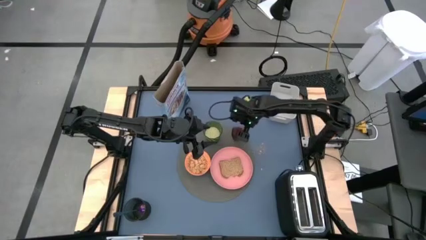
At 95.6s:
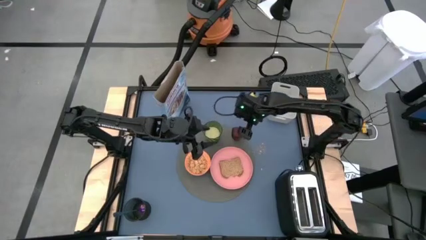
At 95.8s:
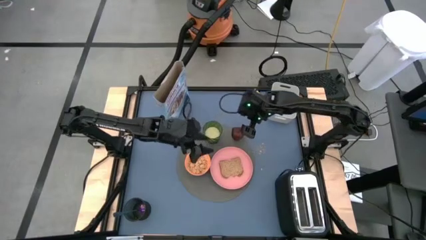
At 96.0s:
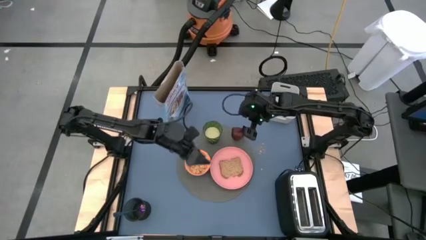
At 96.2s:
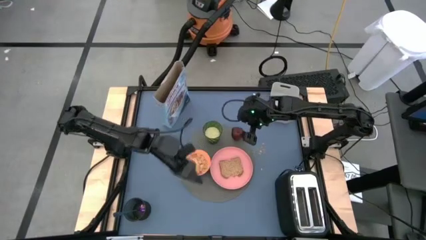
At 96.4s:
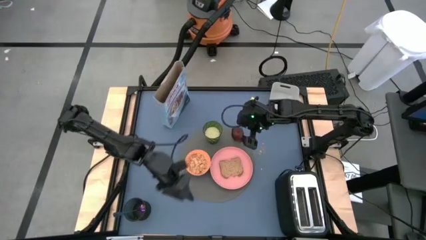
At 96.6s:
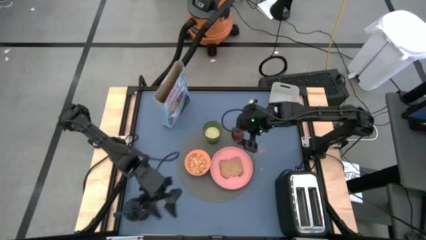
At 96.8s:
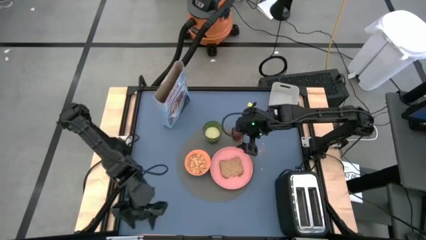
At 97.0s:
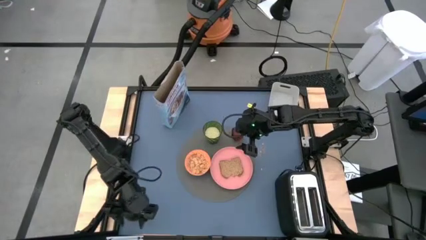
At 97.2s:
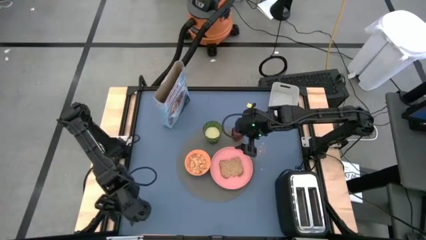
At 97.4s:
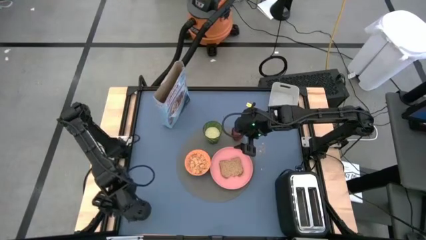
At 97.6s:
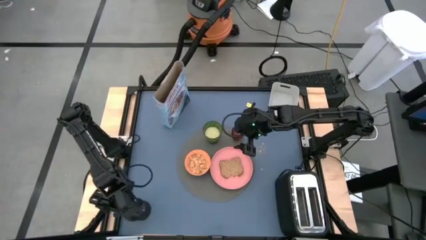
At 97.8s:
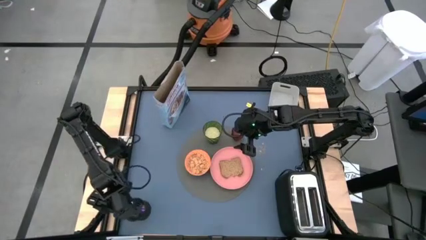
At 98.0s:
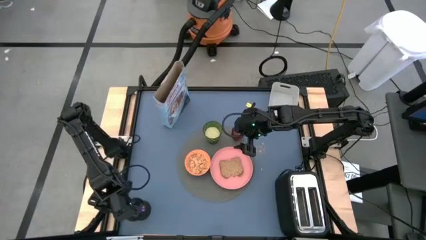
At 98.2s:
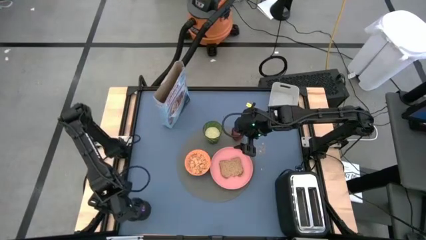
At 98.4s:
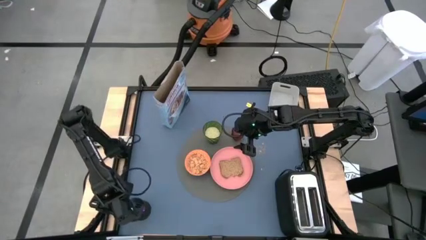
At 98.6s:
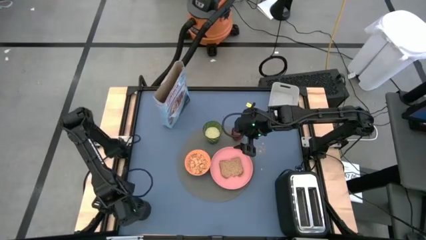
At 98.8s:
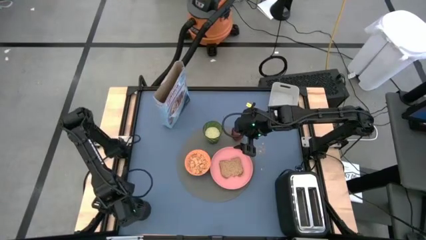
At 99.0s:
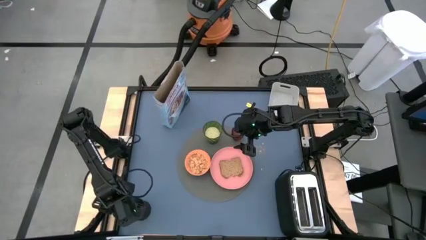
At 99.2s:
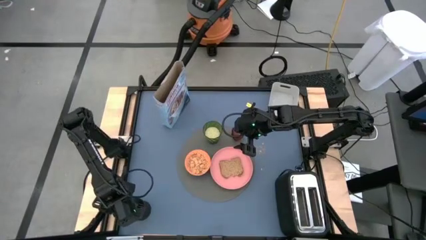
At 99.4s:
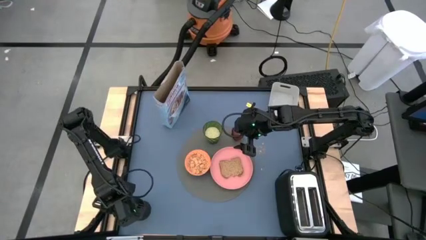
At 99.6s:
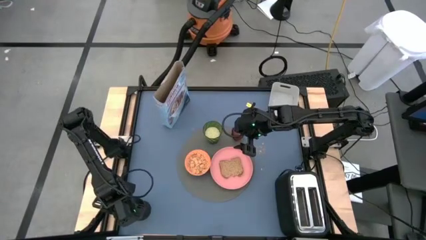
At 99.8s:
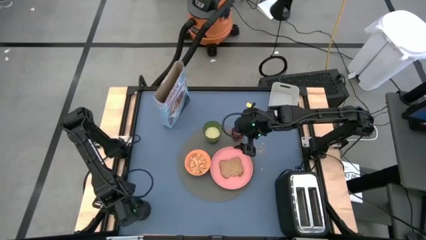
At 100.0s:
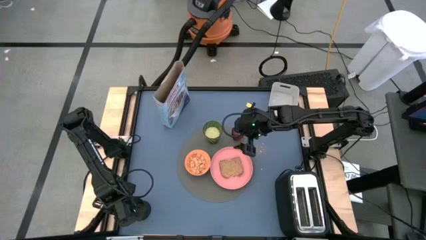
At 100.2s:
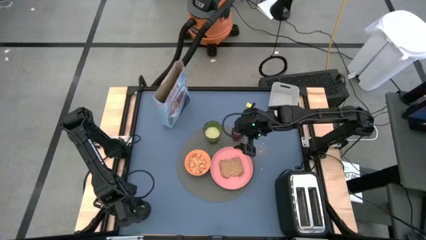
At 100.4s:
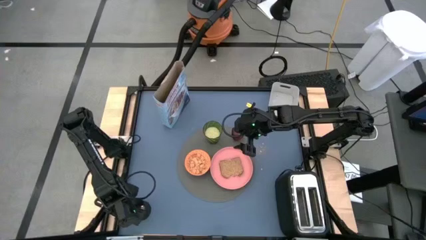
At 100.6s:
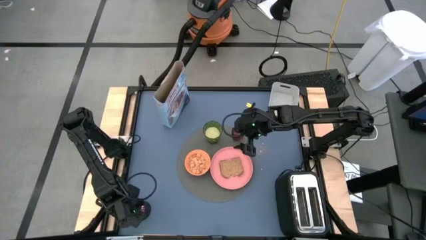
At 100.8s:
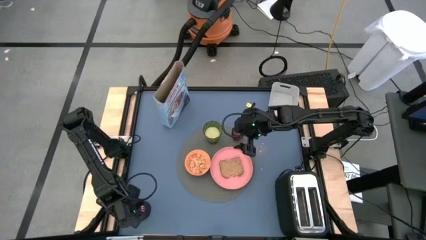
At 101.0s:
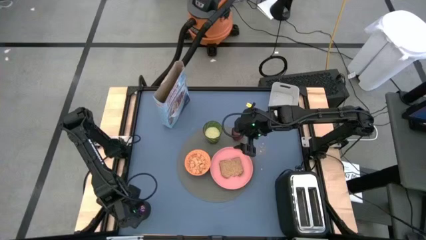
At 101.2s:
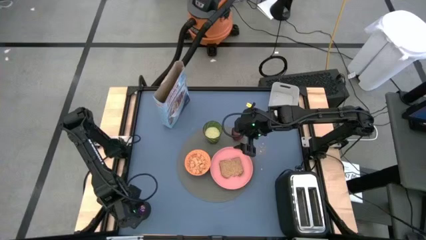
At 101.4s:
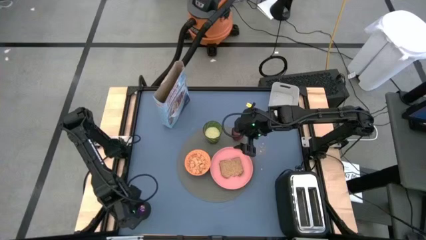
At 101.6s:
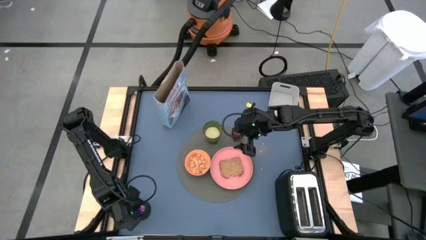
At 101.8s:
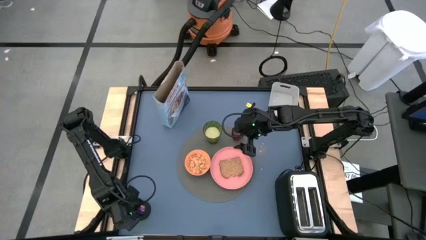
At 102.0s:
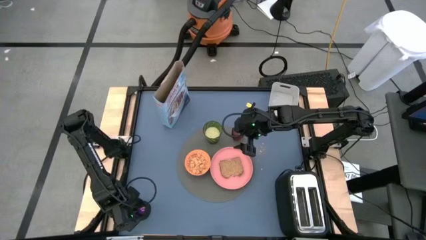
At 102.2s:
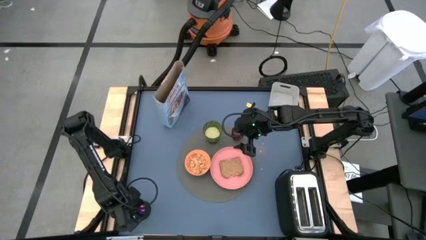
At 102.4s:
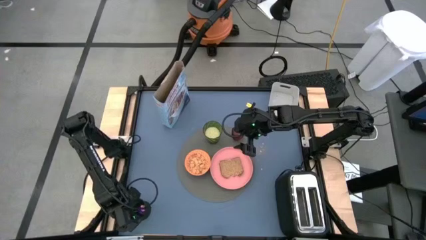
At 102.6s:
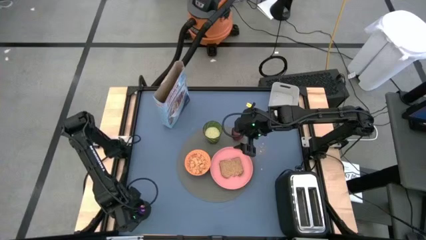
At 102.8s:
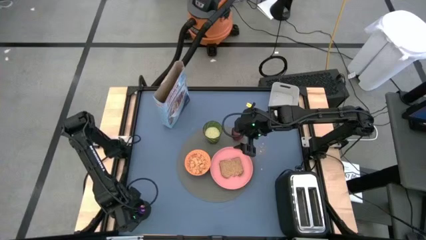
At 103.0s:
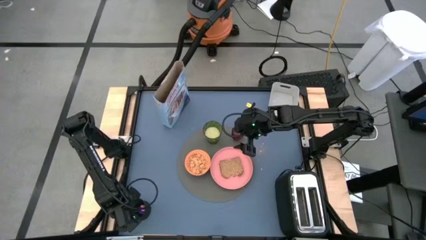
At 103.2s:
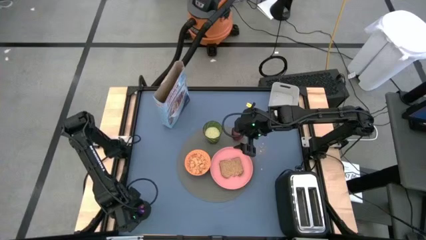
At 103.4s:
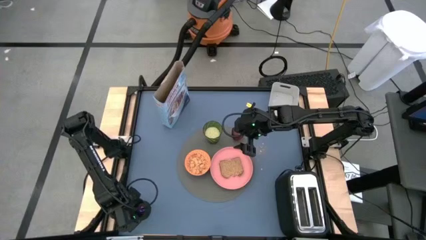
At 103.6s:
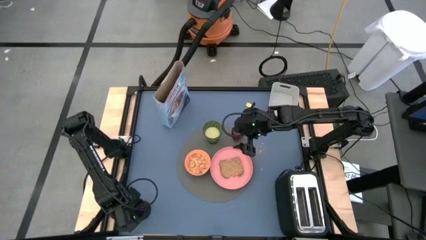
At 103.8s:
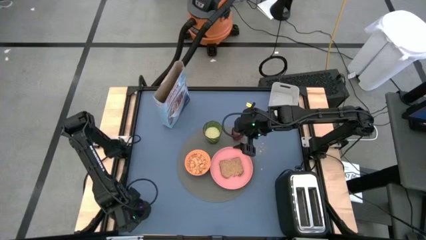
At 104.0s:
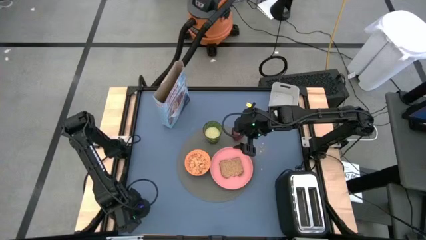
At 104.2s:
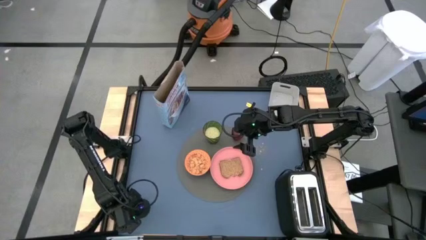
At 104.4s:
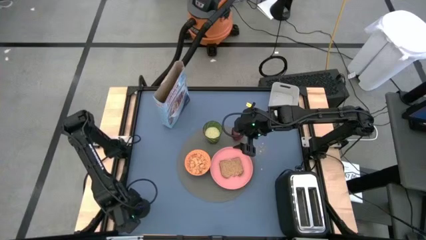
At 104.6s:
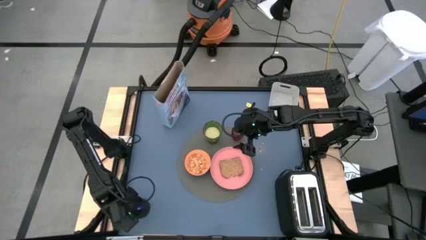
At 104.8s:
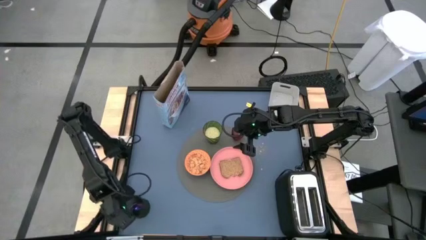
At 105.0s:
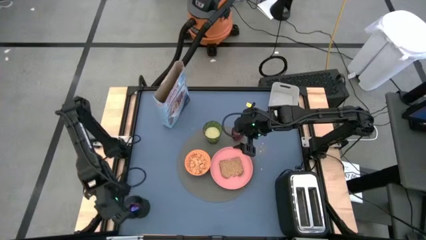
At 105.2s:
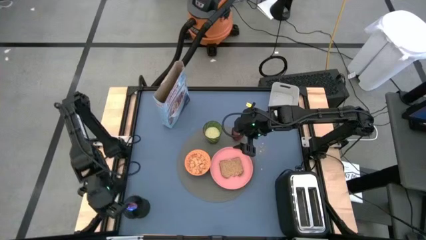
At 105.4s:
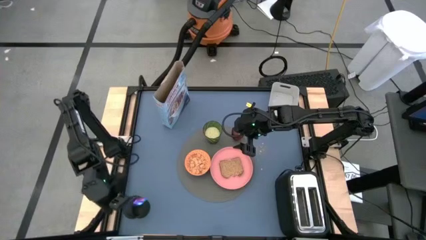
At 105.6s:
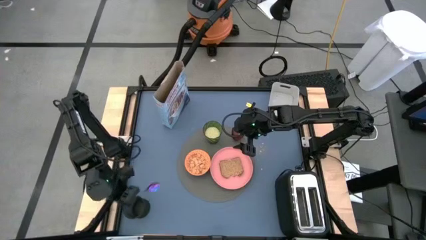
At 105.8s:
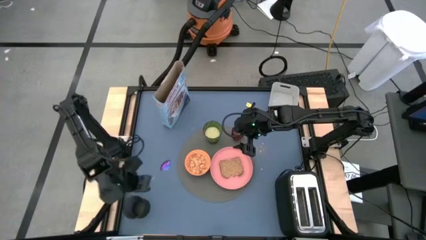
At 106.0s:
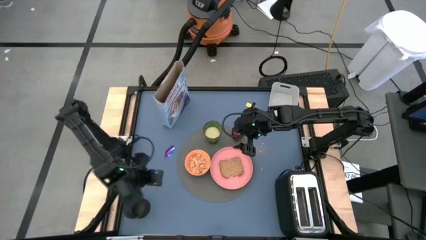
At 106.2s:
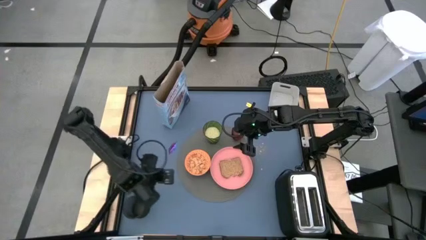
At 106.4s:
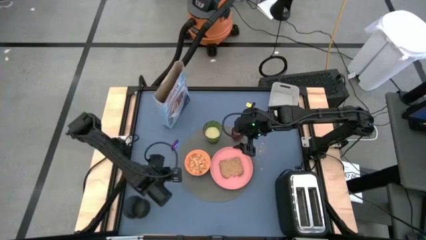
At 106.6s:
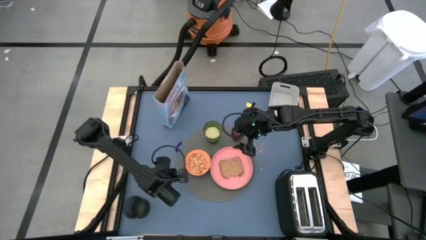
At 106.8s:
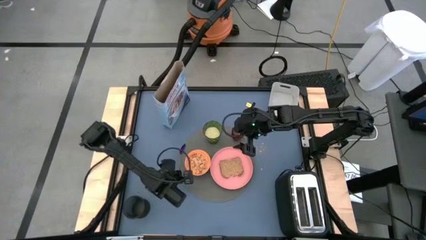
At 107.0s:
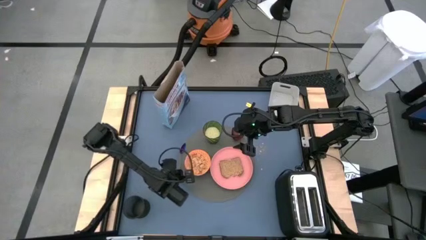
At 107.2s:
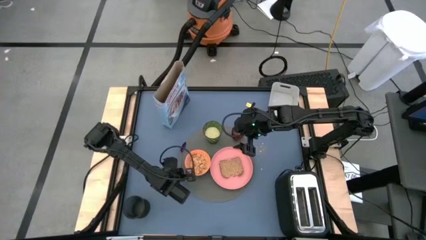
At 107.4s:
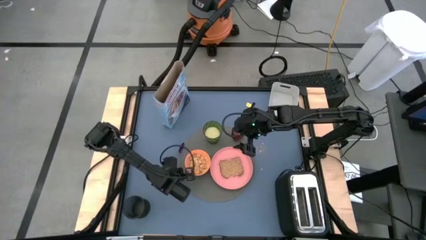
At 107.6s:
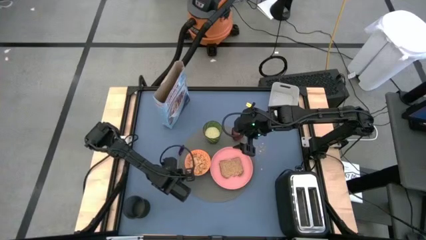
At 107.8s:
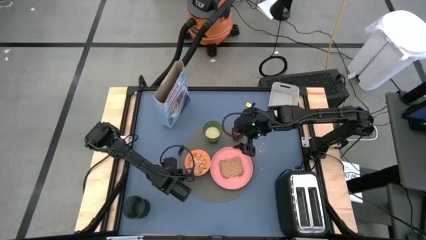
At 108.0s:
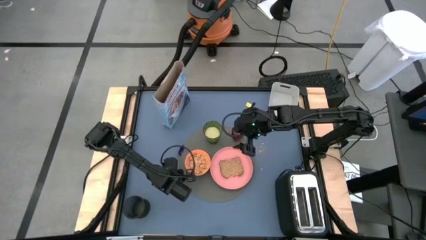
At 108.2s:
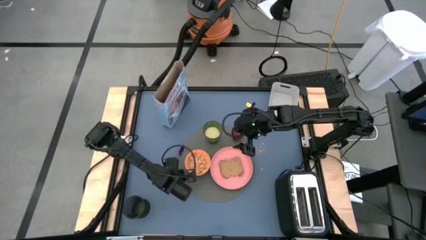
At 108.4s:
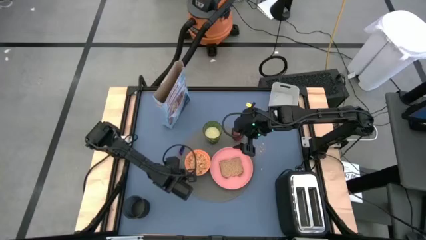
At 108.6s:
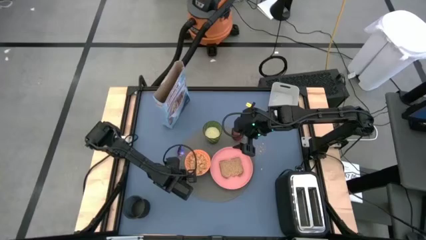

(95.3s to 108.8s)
Task: Arrange a breakfast setting
Put the blue spoon on the gray table mat to the left side of the orange bowl

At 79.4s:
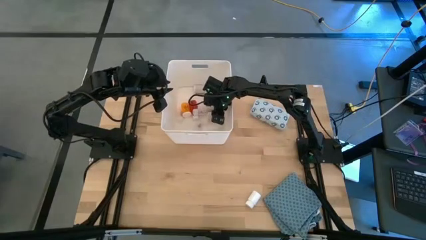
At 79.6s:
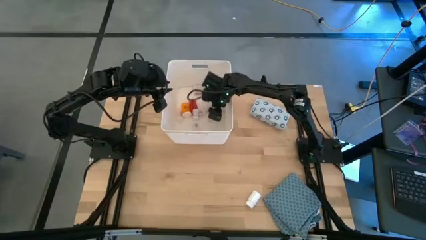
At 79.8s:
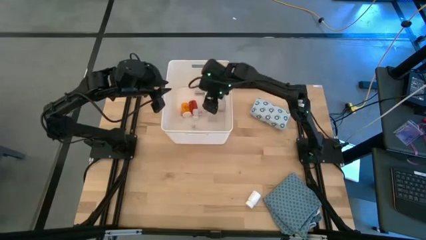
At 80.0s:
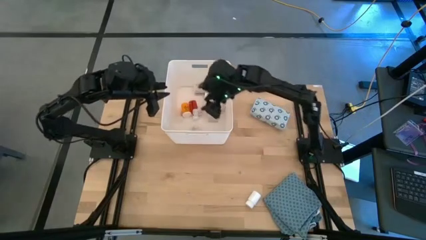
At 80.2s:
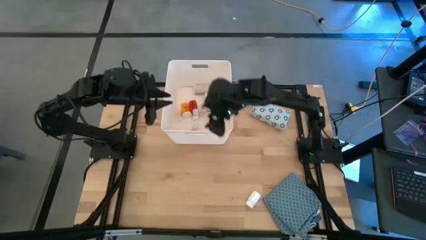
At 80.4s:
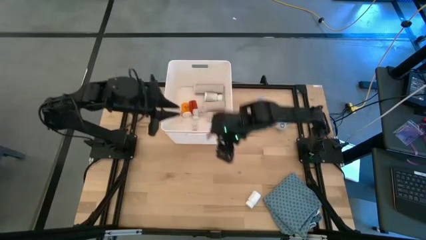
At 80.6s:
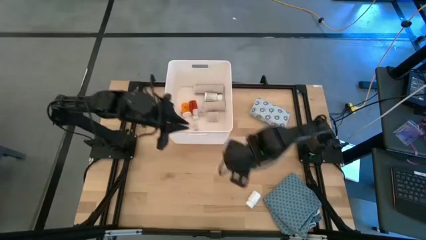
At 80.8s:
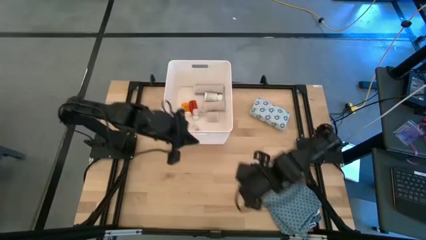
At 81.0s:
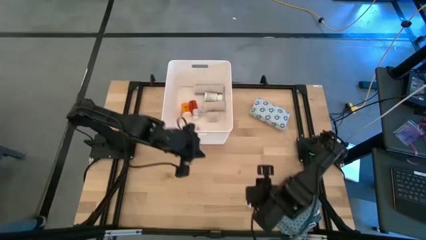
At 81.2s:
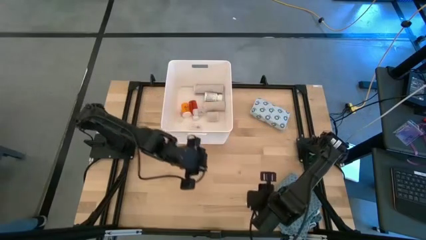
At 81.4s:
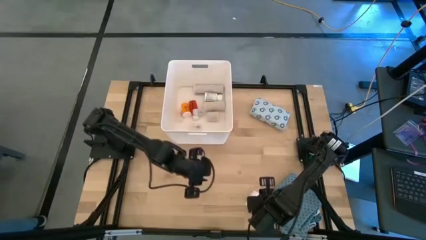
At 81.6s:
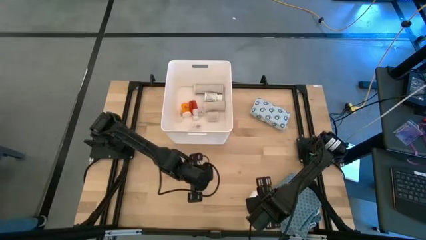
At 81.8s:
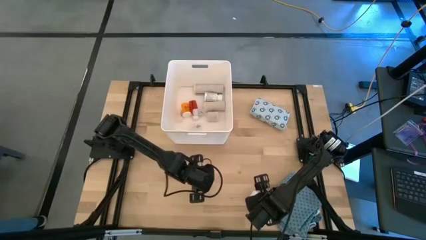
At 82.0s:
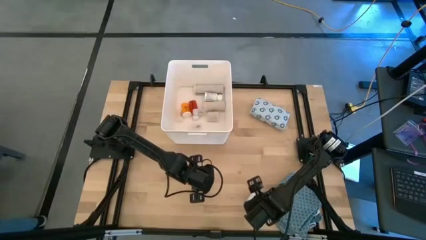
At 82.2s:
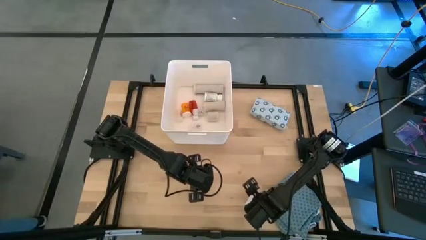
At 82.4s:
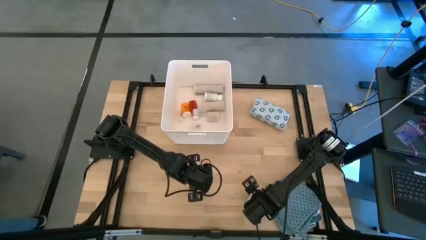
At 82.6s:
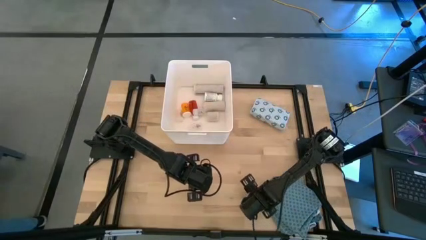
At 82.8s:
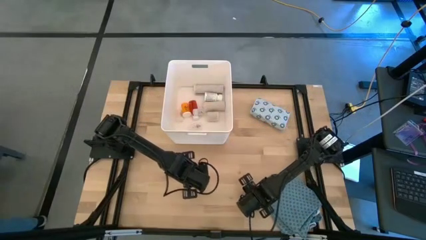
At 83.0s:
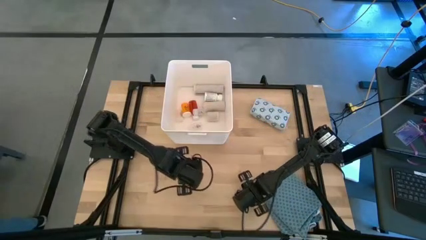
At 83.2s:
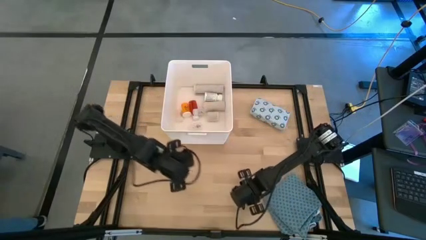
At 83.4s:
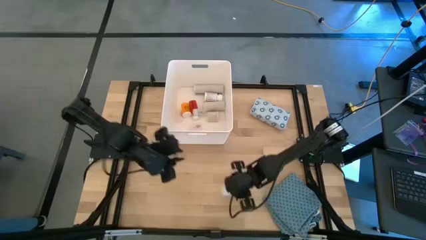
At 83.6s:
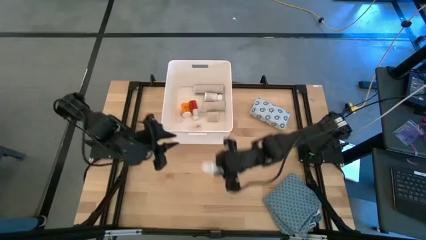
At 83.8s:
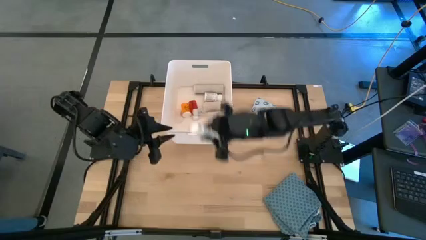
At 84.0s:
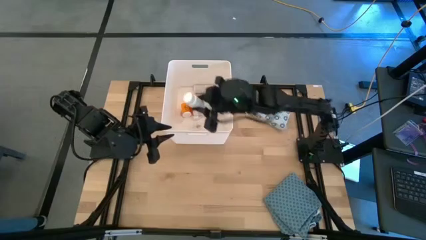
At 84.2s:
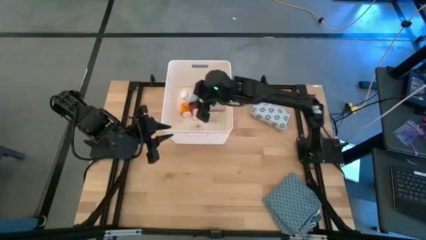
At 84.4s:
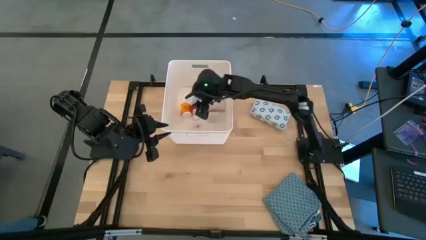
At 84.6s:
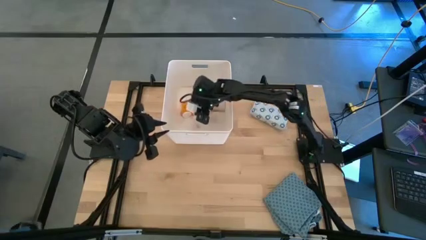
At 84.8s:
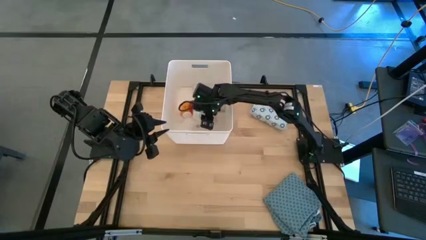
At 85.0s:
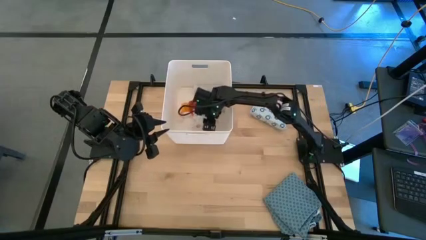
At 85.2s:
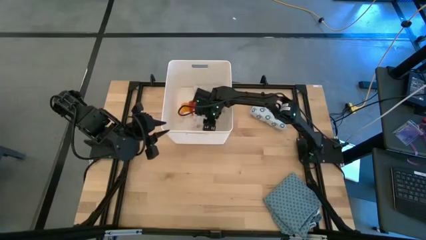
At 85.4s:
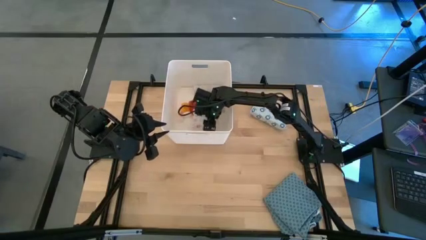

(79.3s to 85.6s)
Task: Pick & place medical supplies in basket/bin
Put the white pill bottle into the white bin
